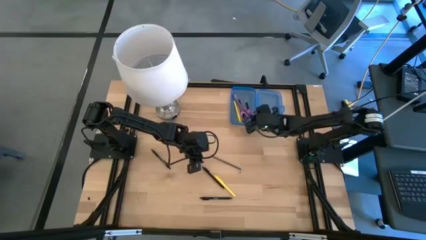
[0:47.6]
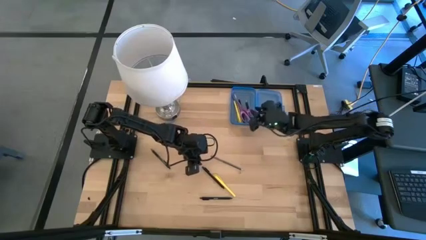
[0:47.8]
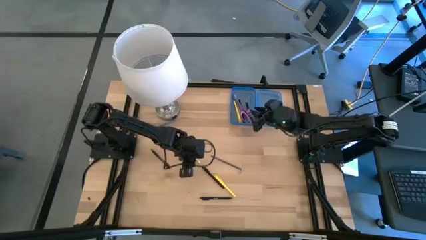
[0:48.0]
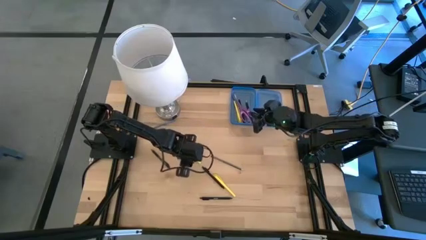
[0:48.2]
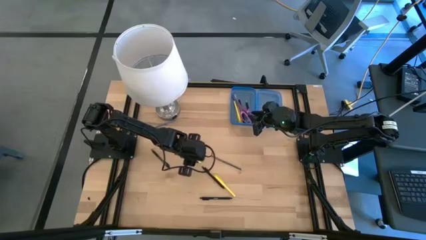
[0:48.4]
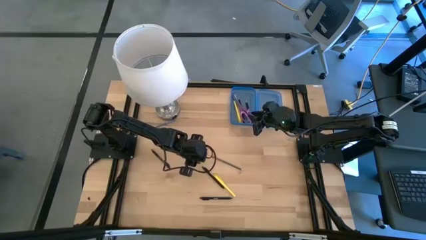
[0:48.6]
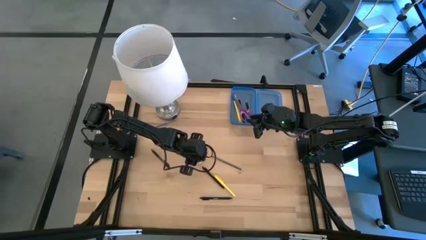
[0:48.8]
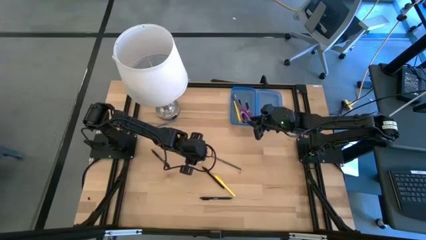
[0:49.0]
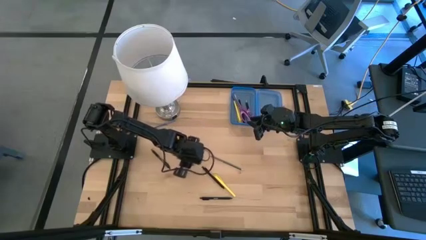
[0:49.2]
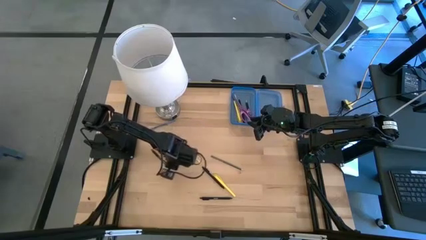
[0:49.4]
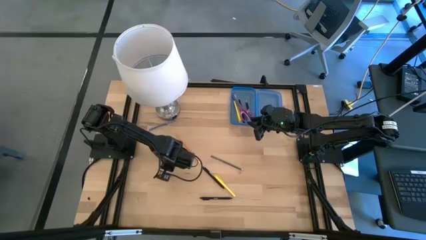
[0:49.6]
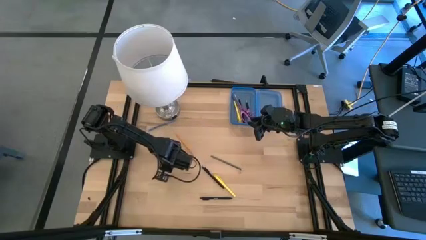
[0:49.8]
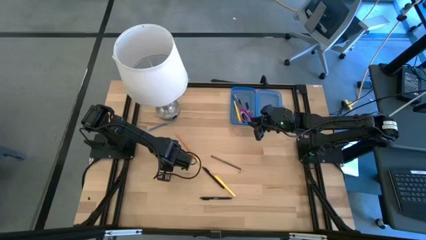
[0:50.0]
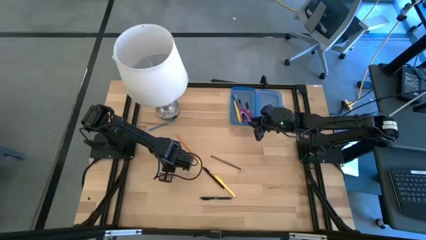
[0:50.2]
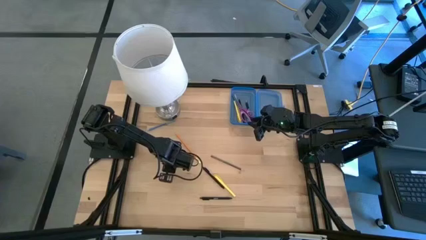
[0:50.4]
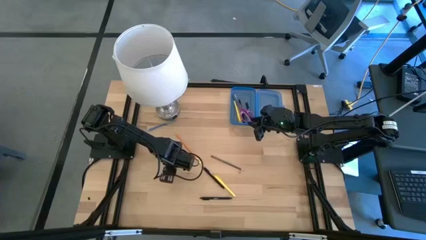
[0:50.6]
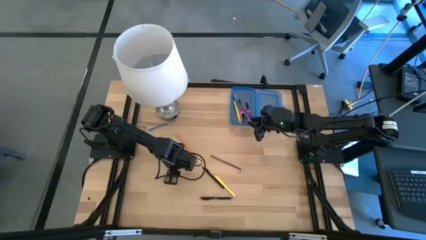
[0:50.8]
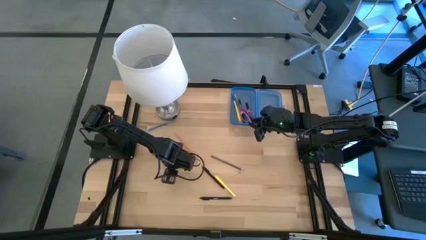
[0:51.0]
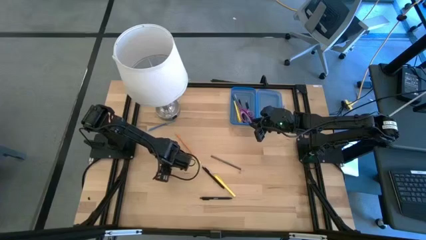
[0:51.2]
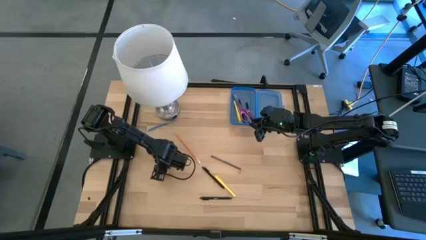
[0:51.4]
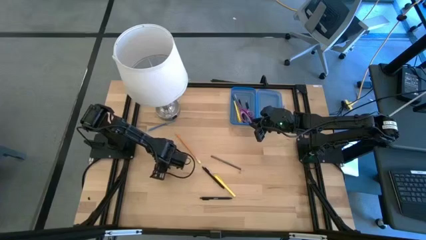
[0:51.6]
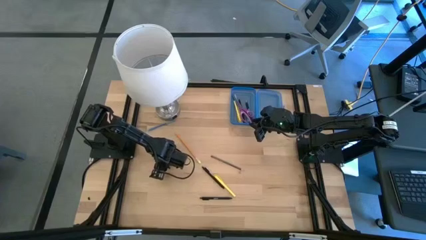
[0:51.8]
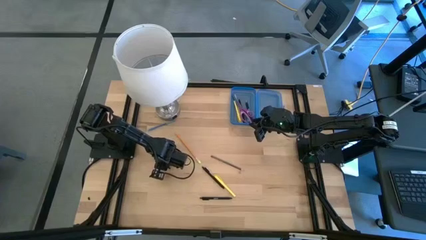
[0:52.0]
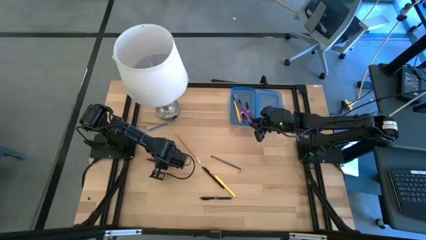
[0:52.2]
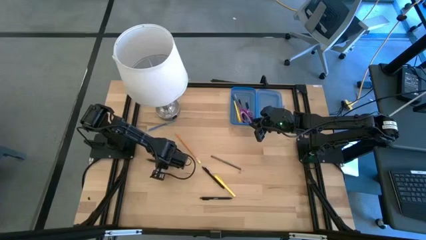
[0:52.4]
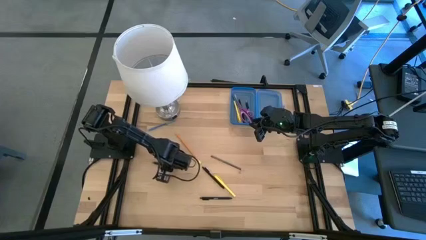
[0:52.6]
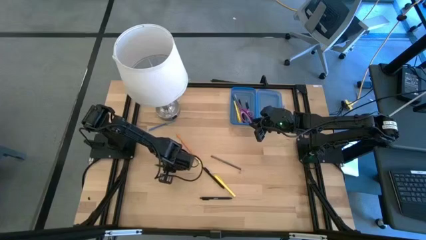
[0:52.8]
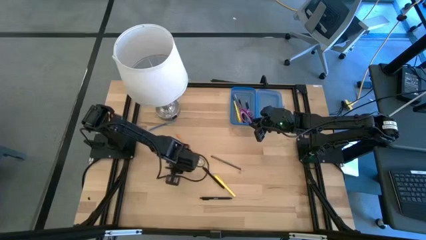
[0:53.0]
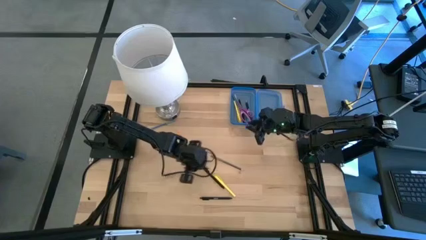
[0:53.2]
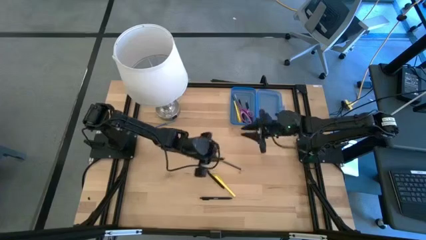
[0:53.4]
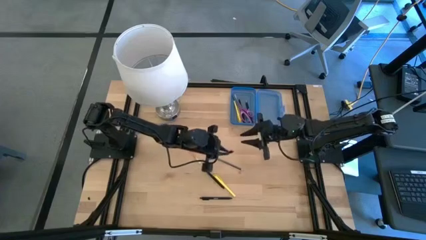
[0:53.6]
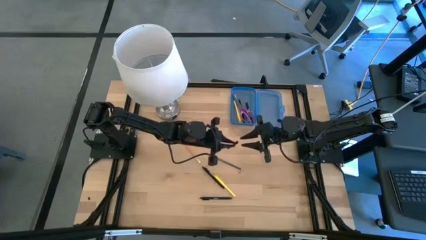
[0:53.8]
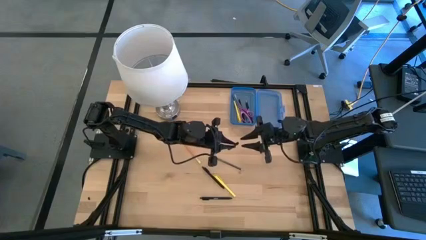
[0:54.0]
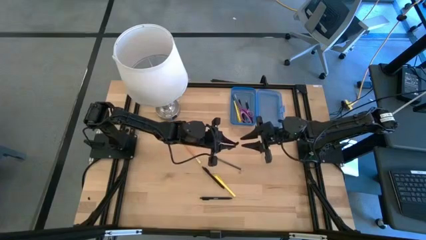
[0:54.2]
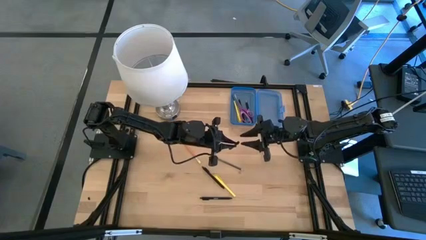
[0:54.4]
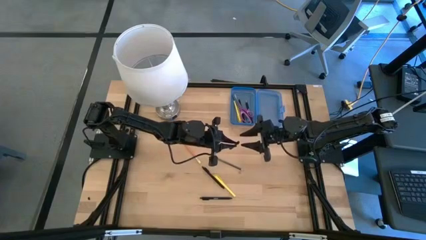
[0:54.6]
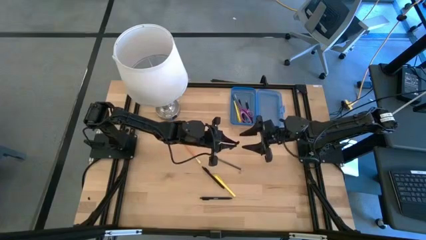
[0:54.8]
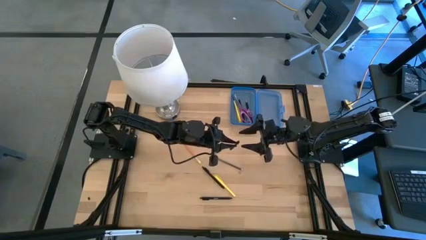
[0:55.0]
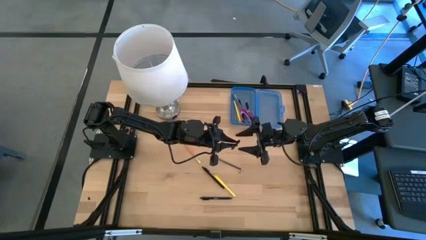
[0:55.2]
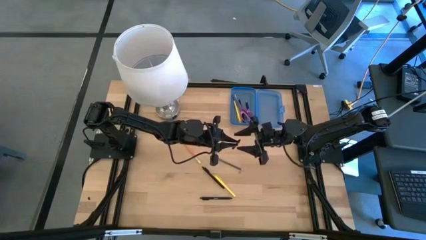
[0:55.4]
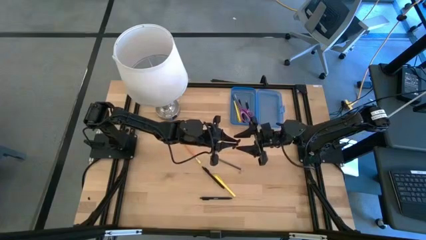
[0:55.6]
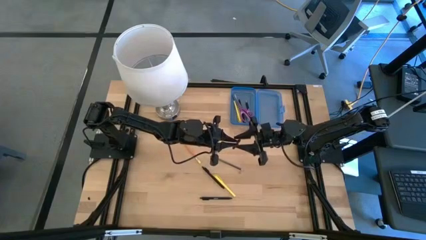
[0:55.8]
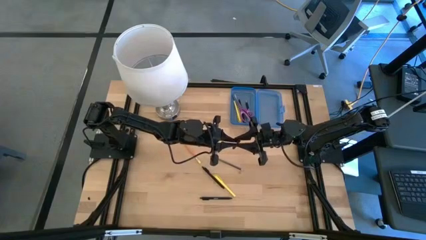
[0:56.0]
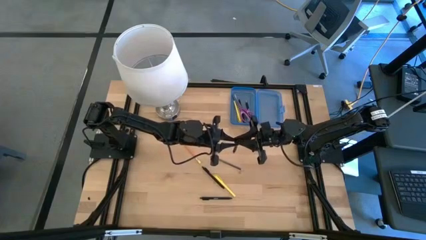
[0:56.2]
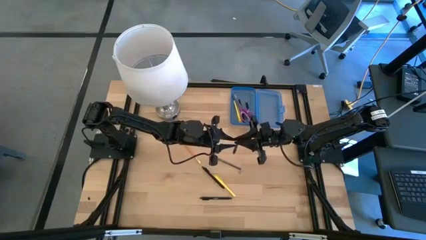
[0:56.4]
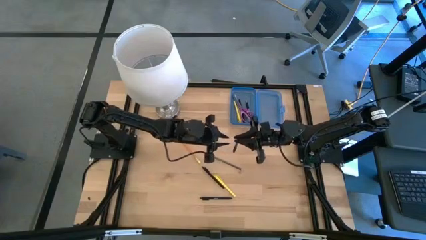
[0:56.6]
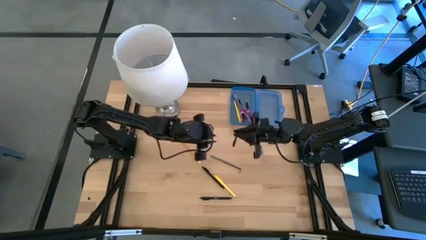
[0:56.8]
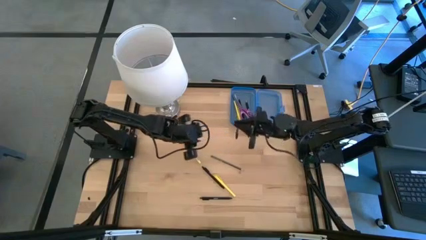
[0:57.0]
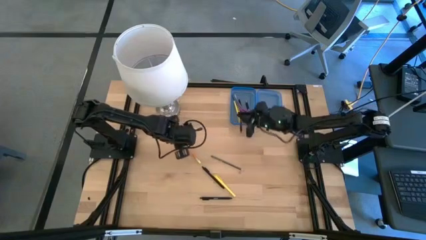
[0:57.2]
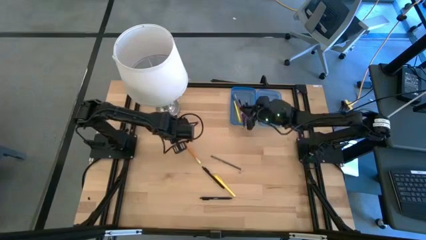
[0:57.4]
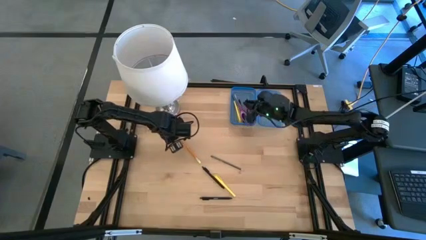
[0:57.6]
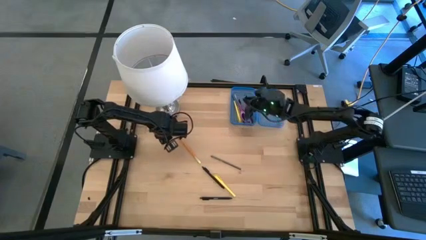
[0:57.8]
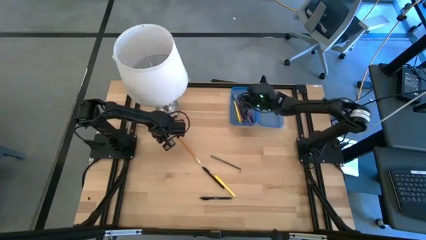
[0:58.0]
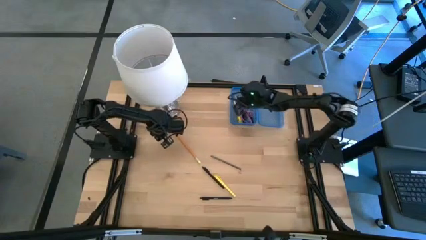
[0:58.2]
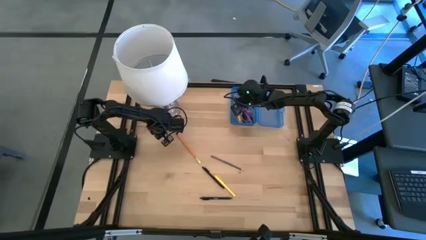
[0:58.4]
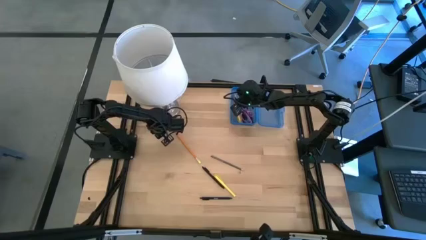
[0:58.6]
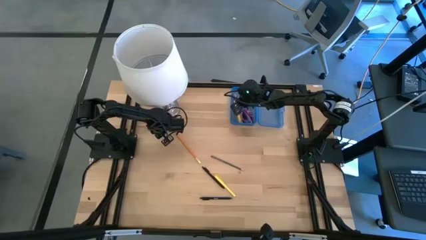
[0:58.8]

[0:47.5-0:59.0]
Task: Pick & place school supplies into a supply box
Put the black transparent pen into the blue supply box
